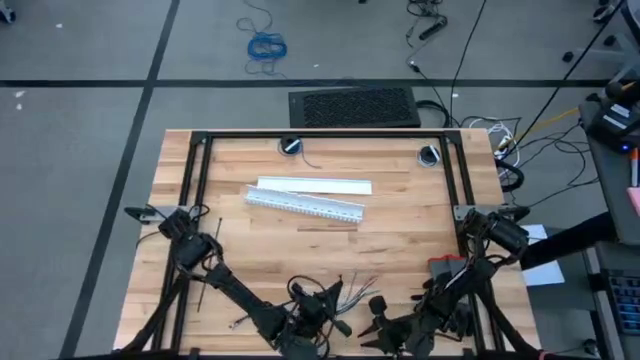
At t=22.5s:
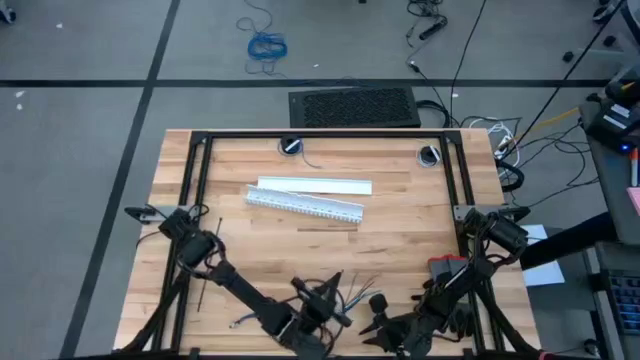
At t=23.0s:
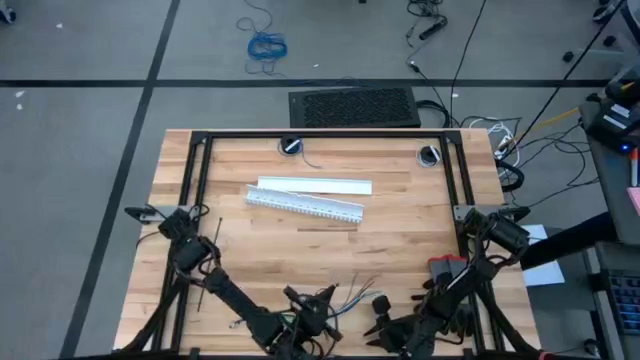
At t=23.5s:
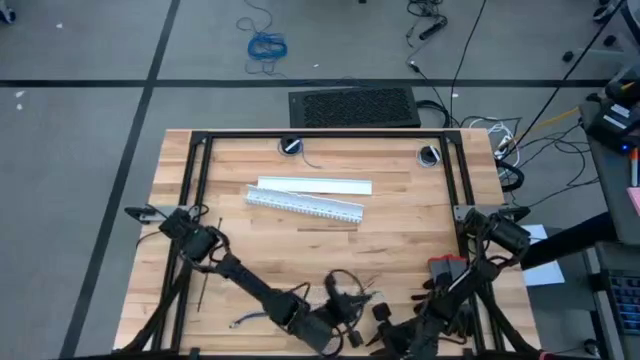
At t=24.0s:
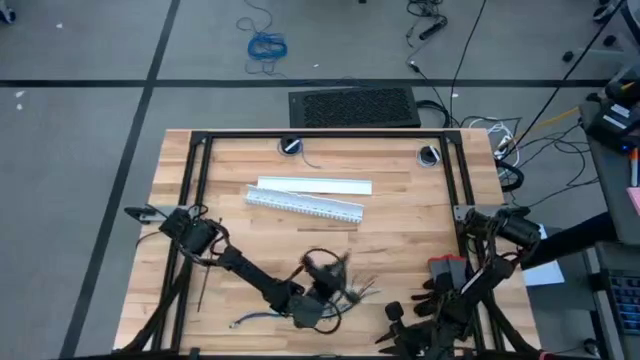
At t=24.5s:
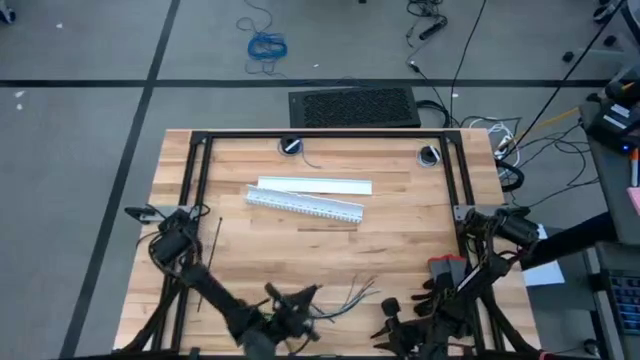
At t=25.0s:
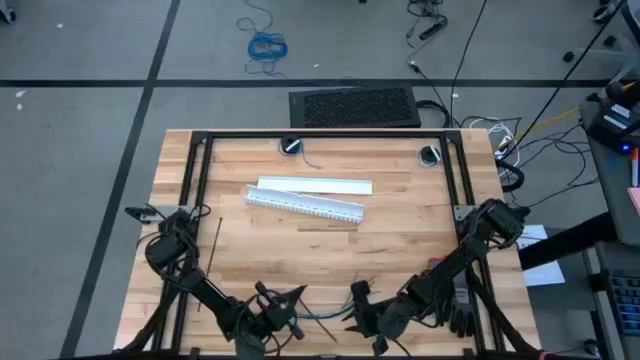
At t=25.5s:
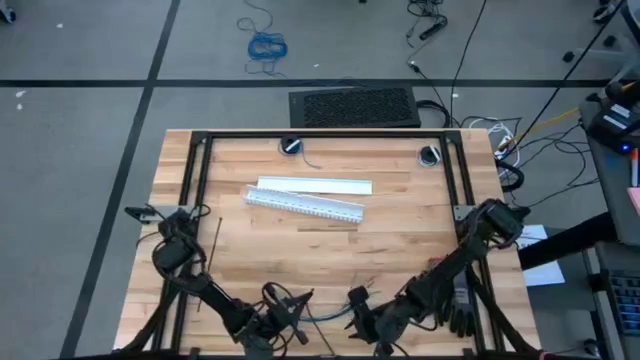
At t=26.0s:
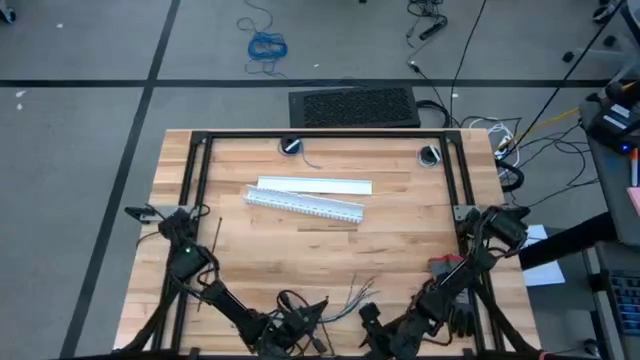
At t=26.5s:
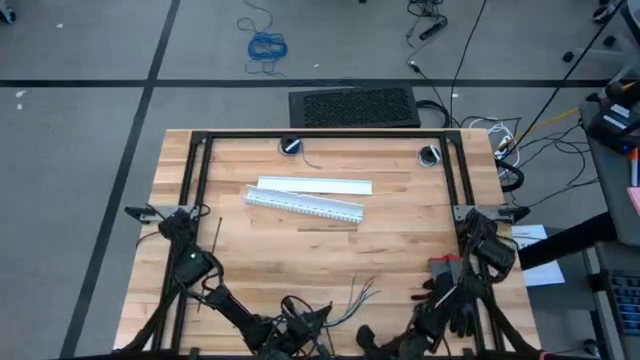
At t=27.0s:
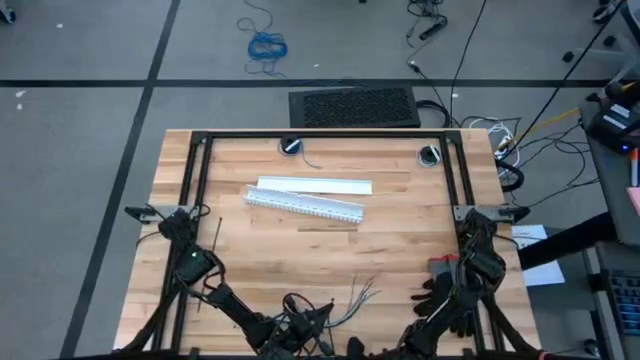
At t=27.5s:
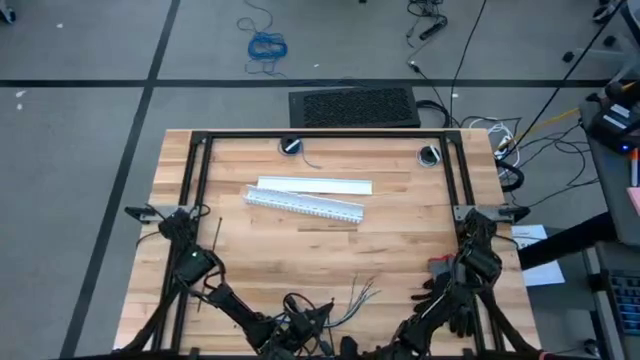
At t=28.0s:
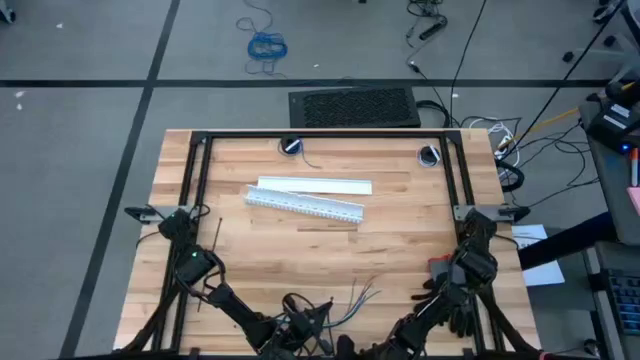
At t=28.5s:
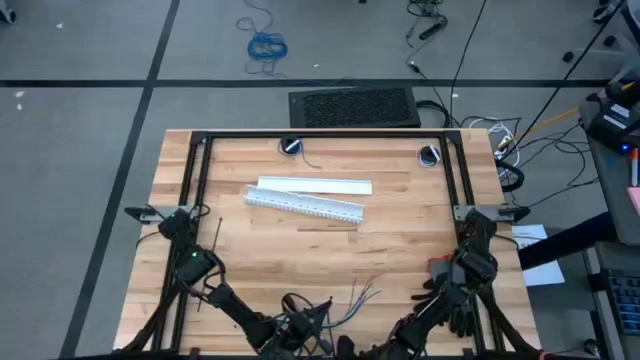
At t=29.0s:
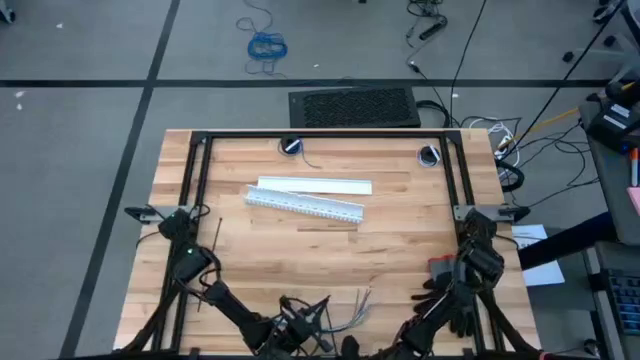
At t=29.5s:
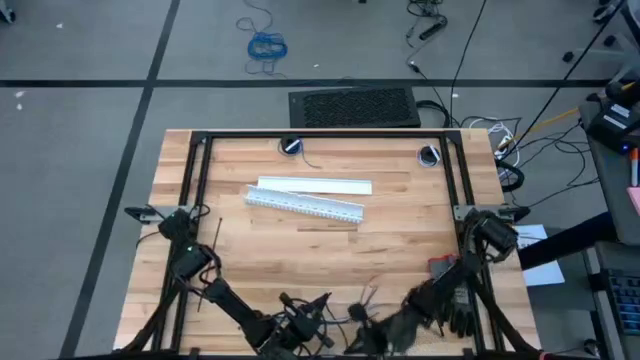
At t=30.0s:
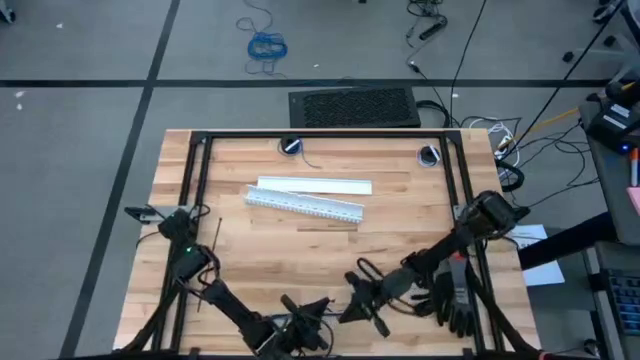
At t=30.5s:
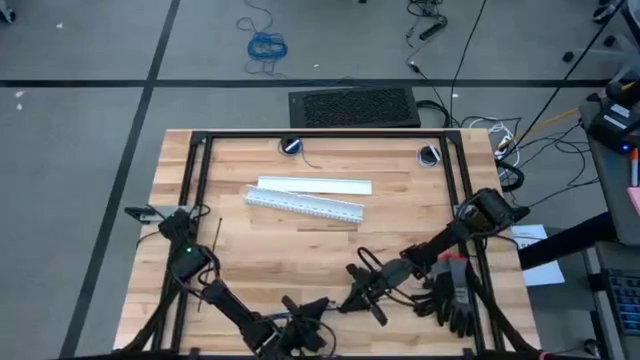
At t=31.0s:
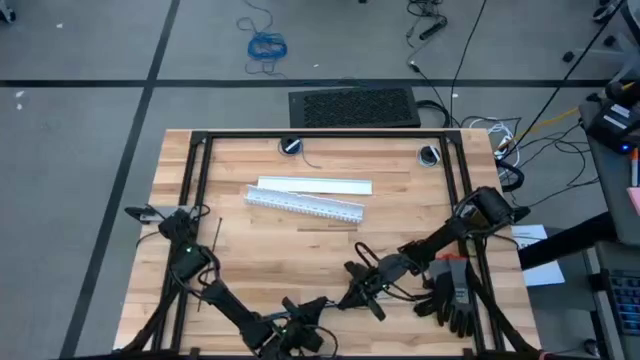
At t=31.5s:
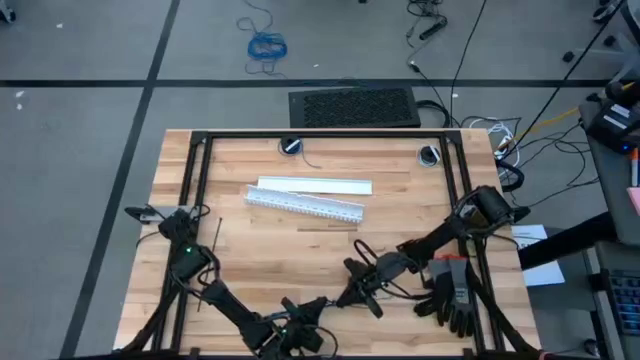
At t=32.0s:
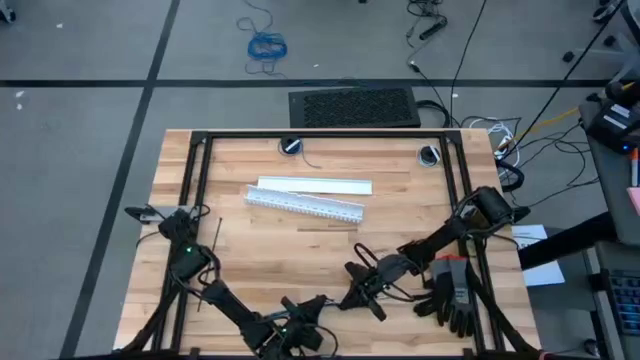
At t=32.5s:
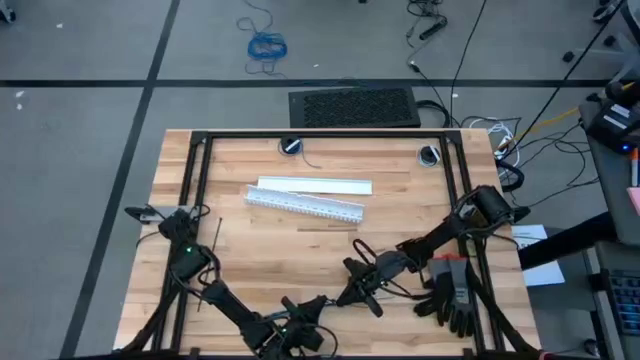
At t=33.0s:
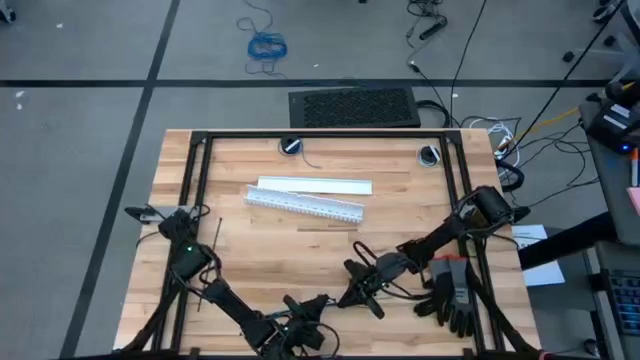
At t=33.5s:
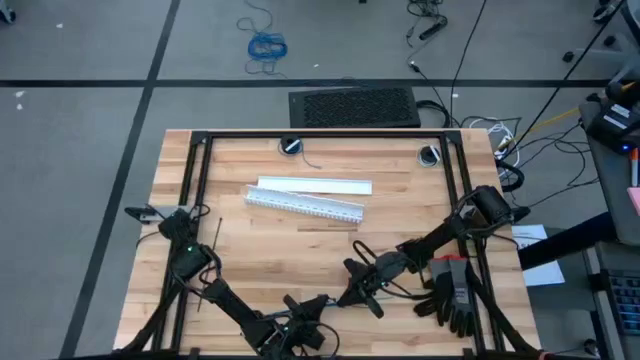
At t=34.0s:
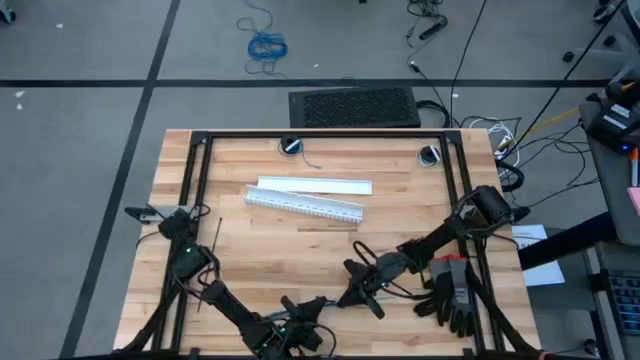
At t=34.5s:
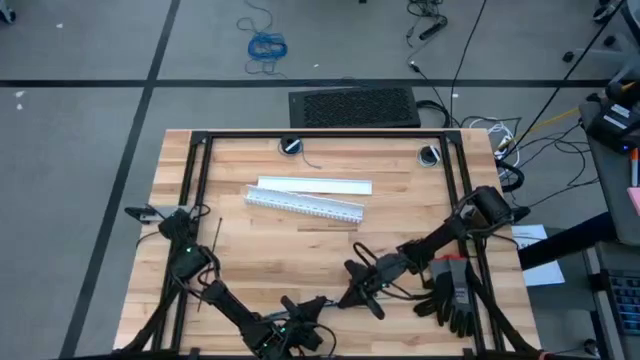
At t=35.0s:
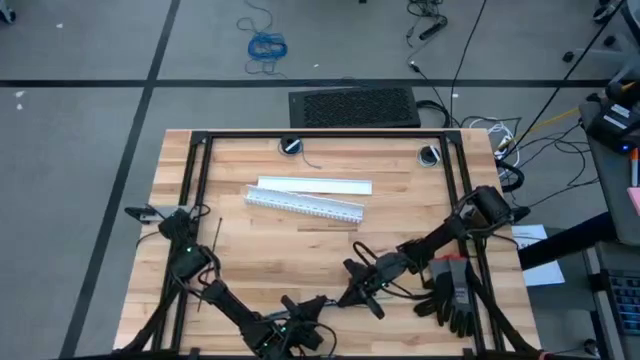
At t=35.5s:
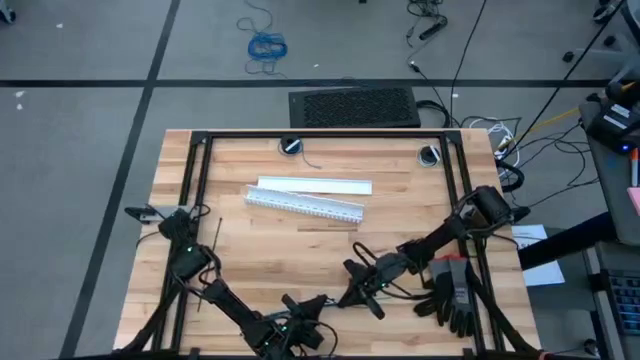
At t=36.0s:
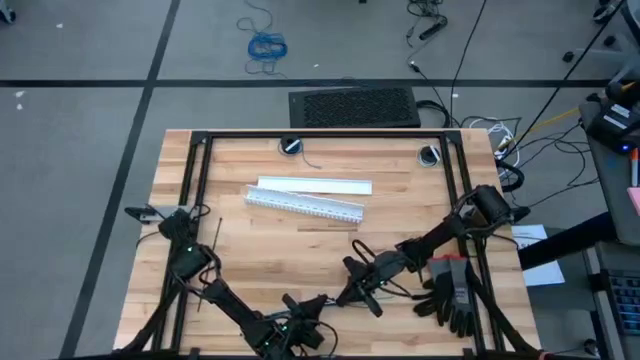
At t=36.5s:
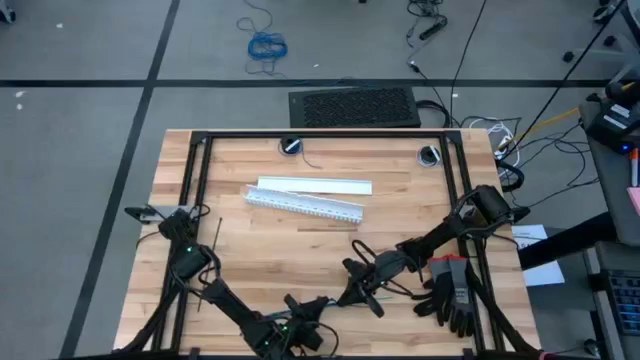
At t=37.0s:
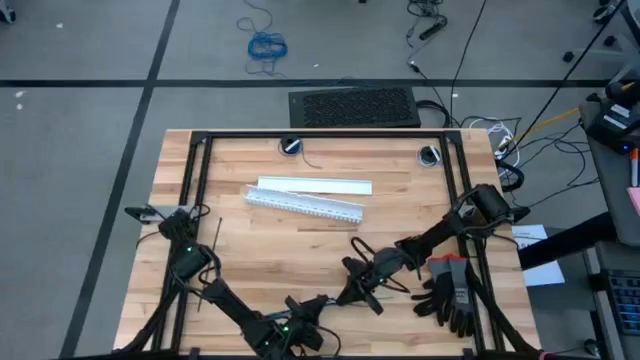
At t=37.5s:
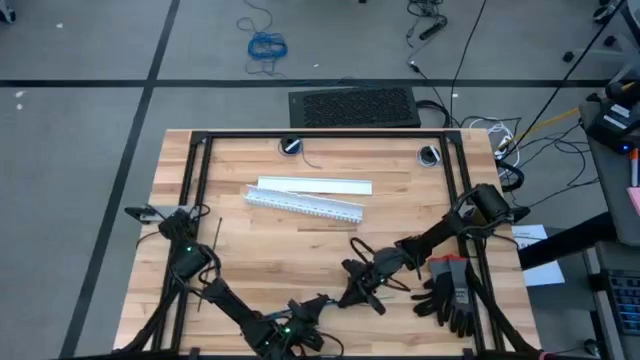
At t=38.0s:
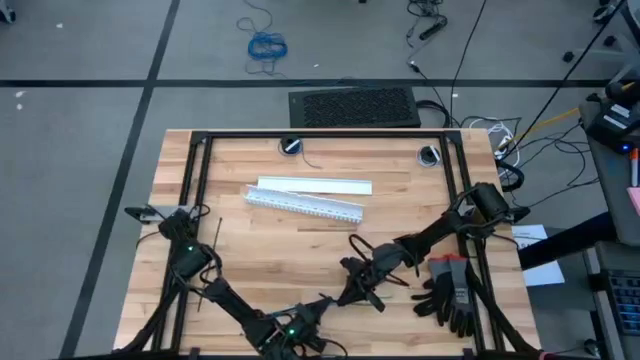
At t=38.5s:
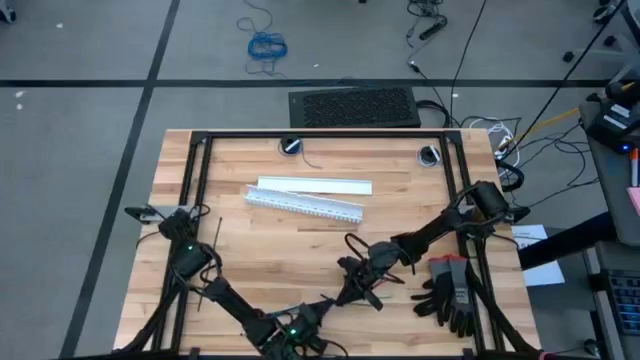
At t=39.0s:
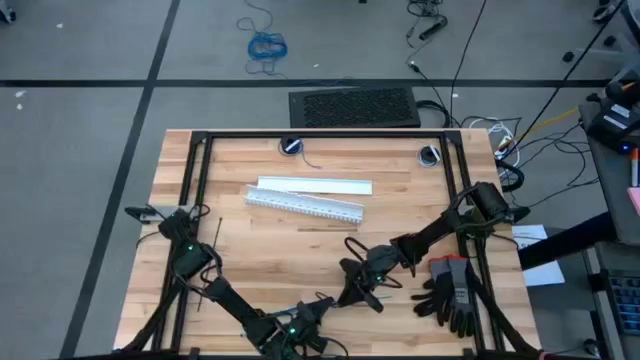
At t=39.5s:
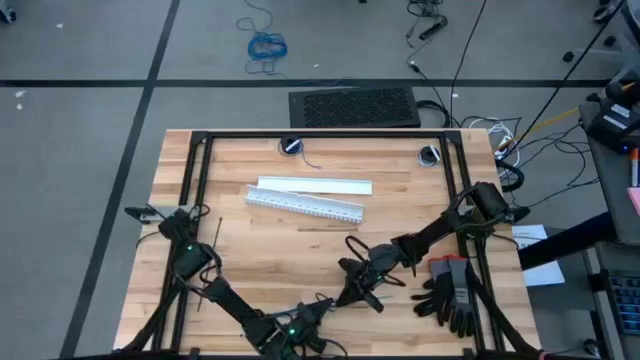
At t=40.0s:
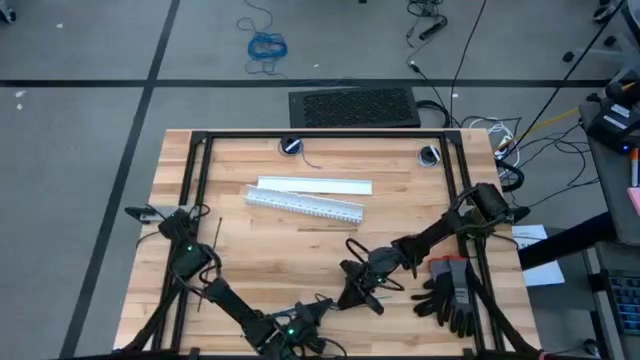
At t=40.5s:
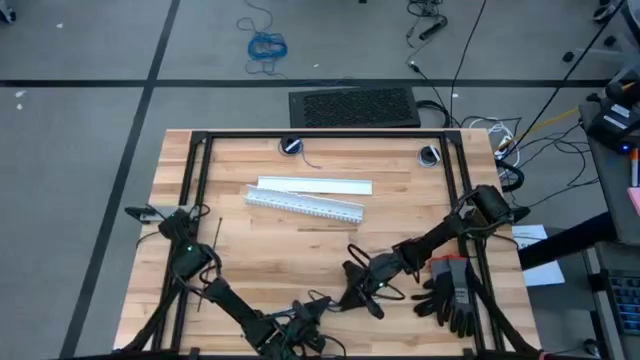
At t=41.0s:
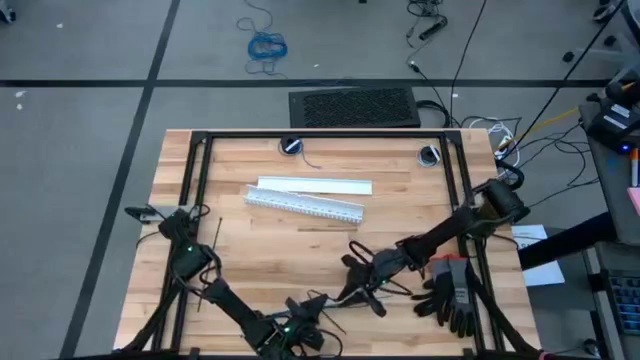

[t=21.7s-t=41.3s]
Task: Ziptie cables
Wrap the cable wire using a zip tie

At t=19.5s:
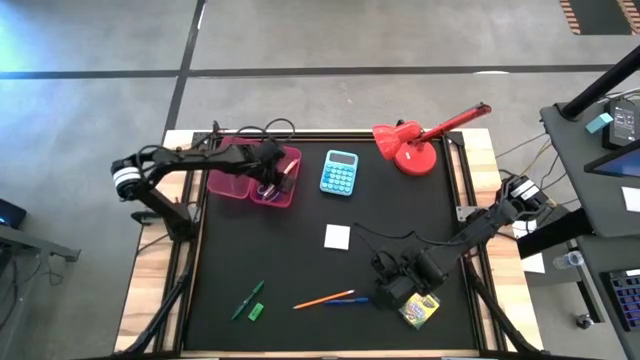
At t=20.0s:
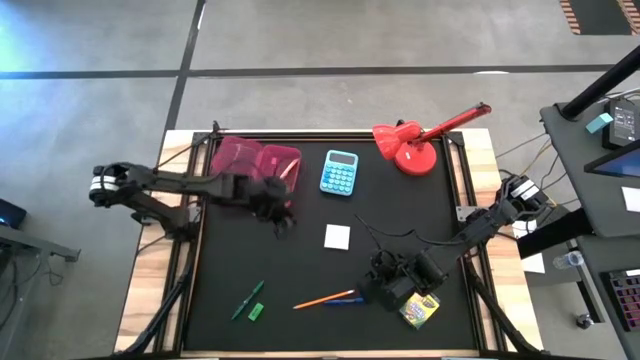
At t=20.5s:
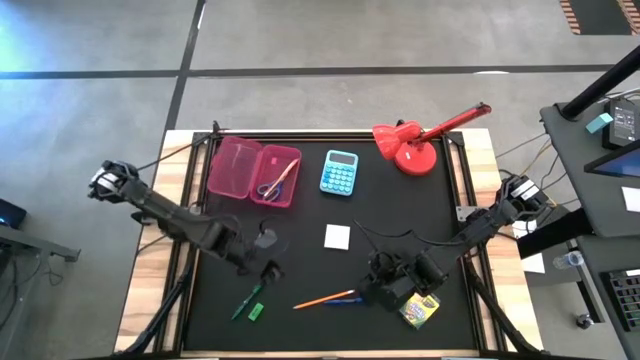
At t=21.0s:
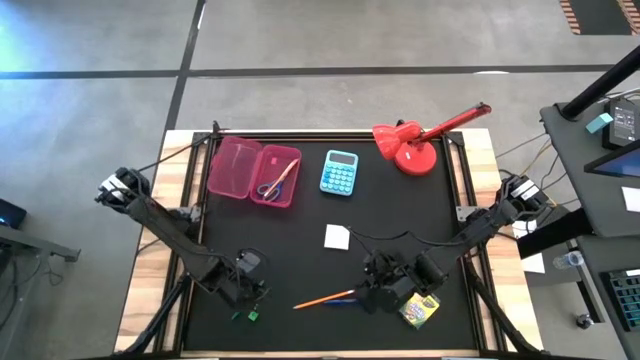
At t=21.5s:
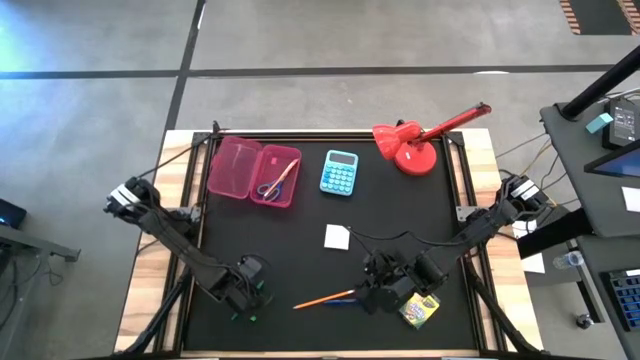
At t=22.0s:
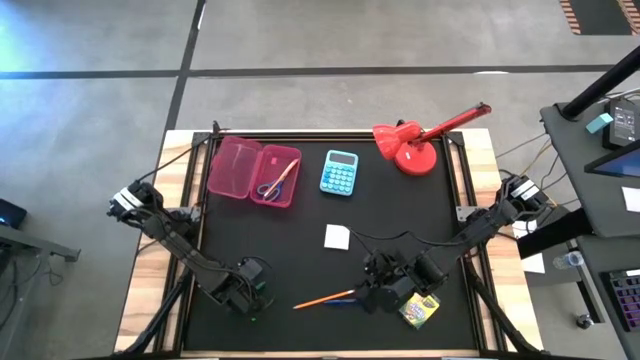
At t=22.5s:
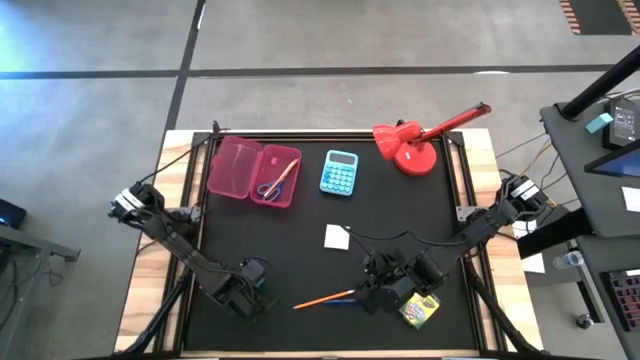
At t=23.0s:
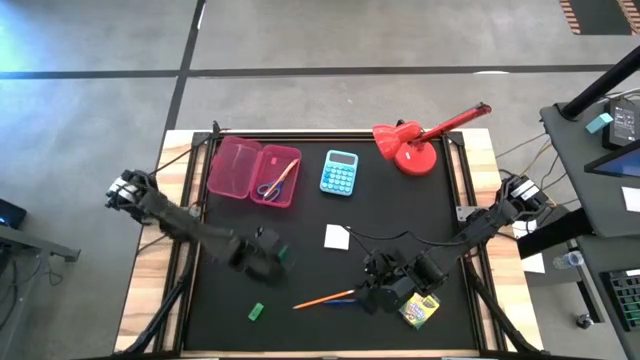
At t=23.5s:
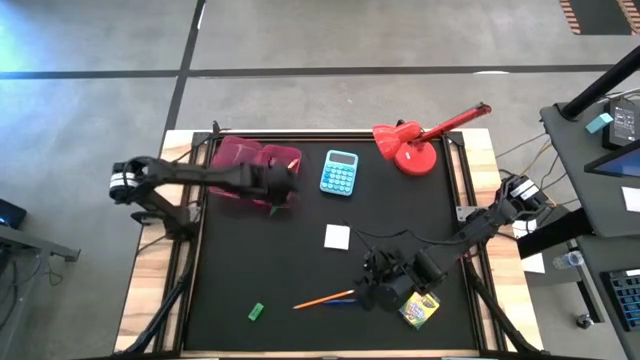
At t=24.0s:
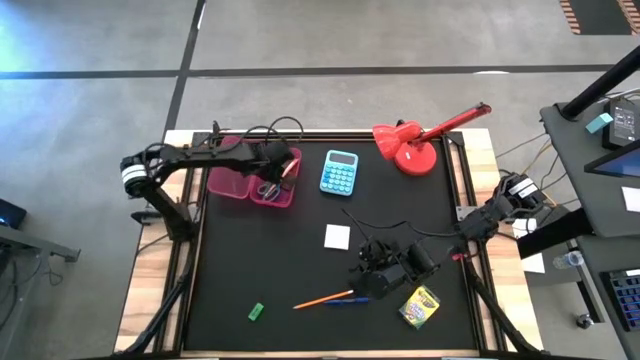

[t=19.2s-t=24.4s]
Task: Pack school essentials
Put the green pen into the pink supply box
